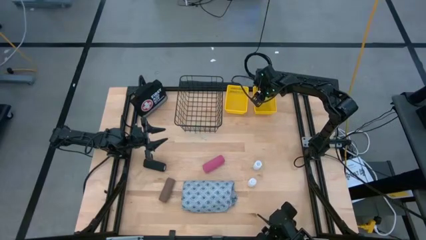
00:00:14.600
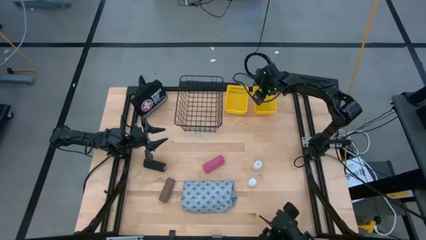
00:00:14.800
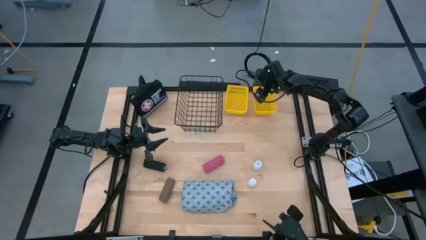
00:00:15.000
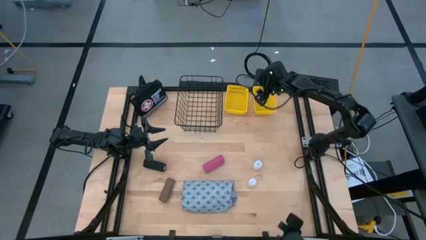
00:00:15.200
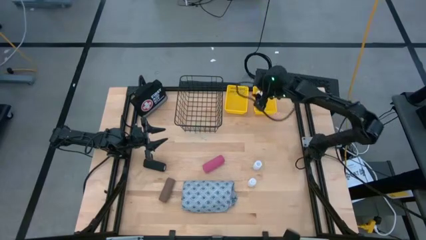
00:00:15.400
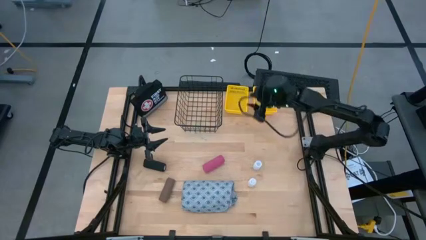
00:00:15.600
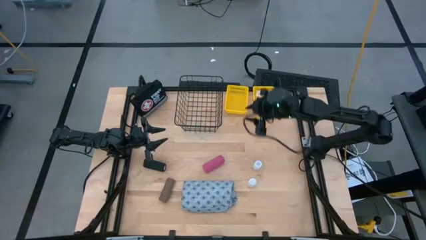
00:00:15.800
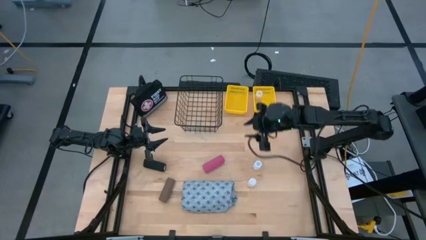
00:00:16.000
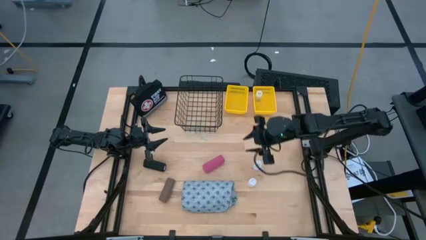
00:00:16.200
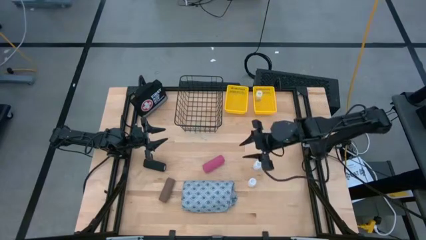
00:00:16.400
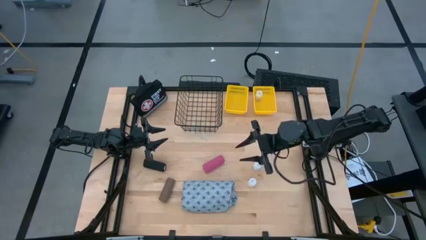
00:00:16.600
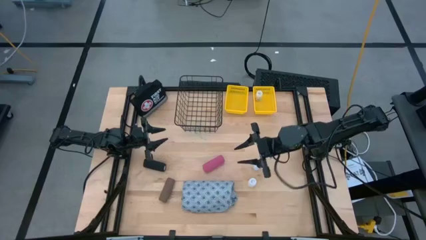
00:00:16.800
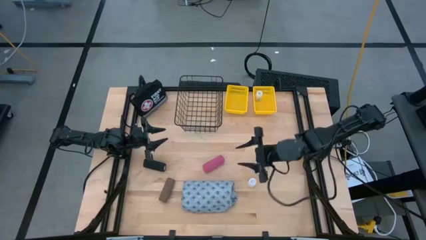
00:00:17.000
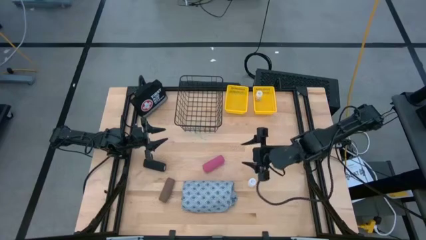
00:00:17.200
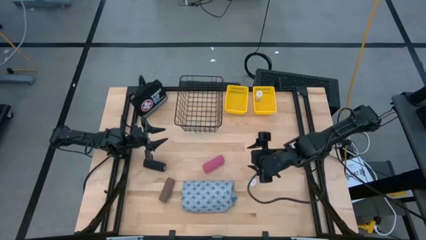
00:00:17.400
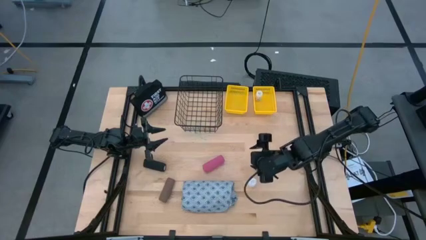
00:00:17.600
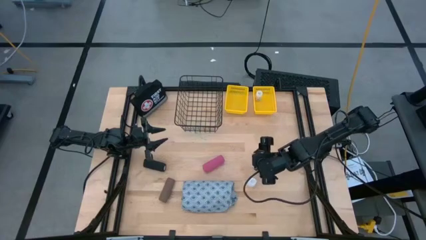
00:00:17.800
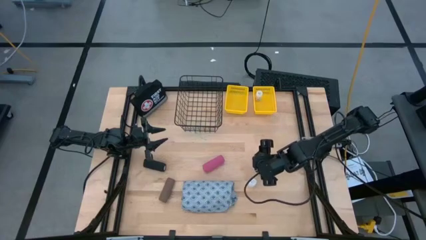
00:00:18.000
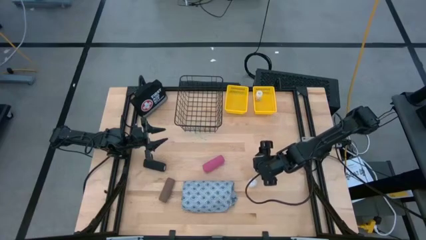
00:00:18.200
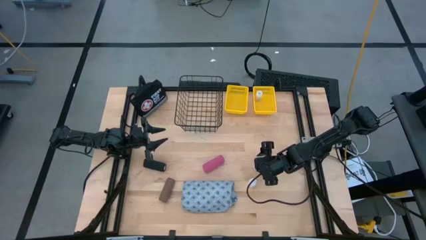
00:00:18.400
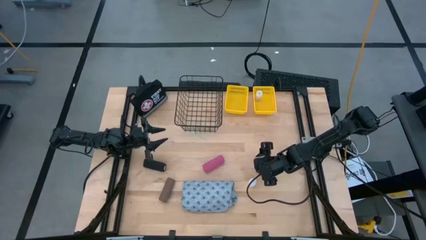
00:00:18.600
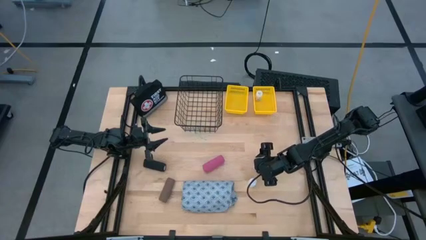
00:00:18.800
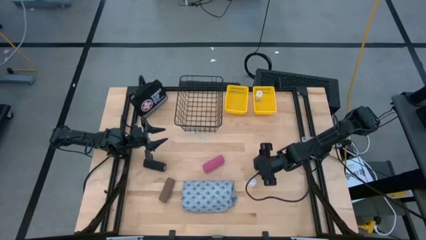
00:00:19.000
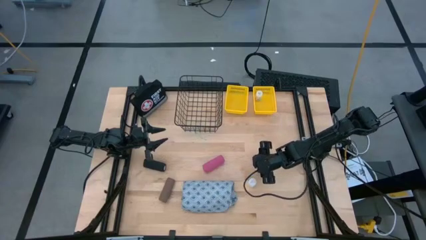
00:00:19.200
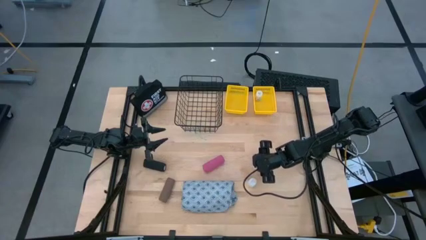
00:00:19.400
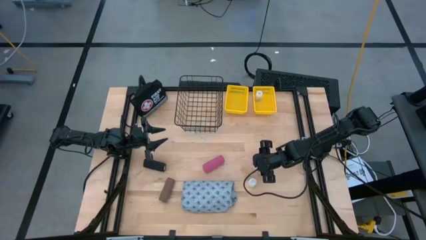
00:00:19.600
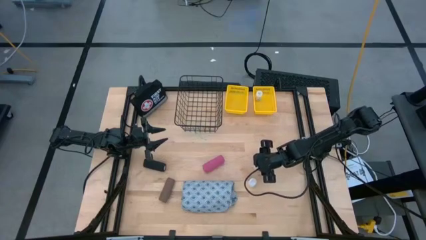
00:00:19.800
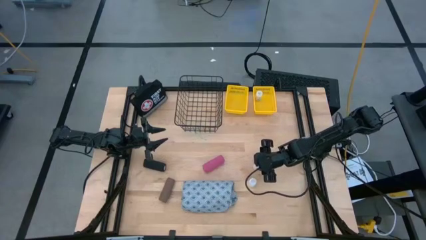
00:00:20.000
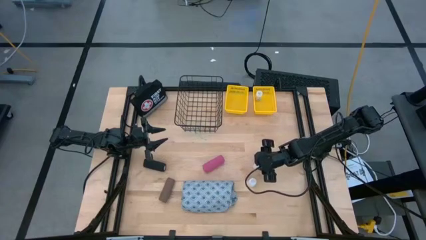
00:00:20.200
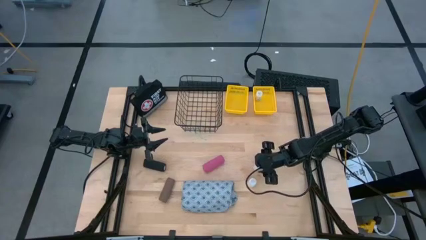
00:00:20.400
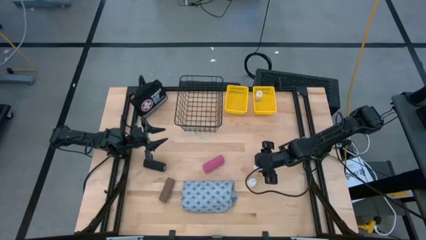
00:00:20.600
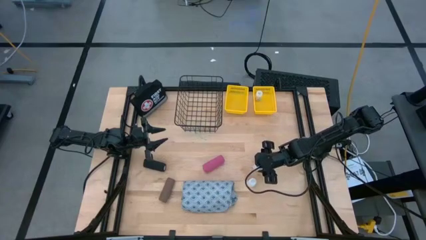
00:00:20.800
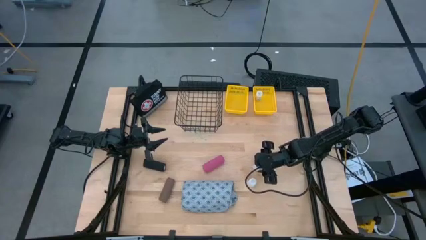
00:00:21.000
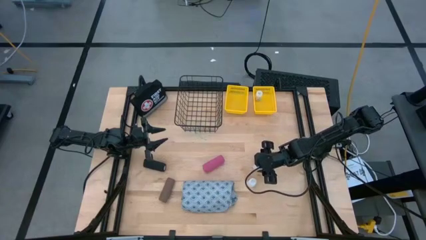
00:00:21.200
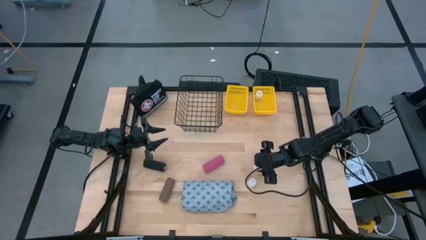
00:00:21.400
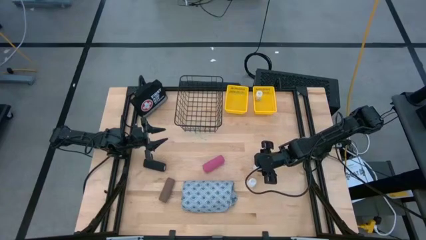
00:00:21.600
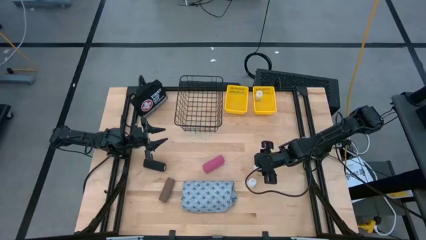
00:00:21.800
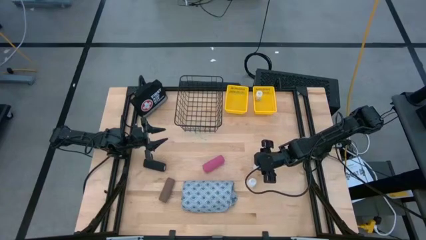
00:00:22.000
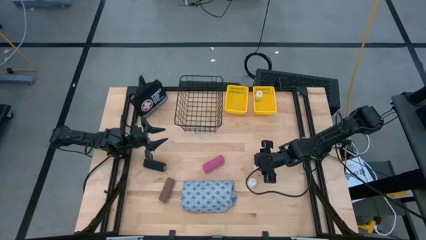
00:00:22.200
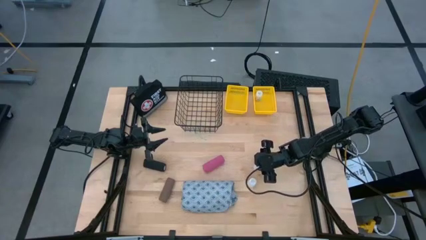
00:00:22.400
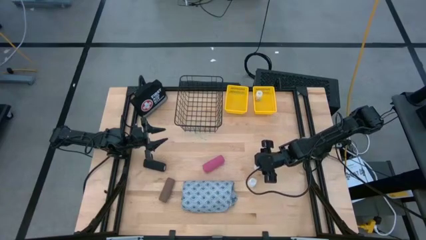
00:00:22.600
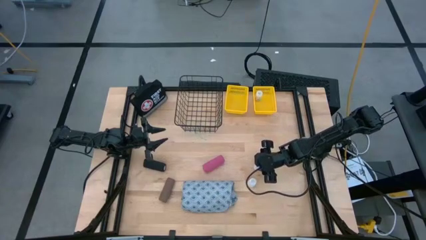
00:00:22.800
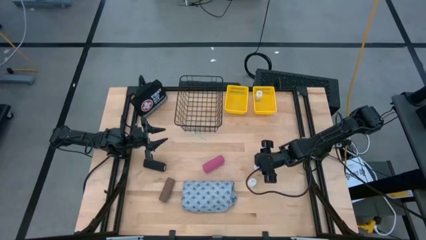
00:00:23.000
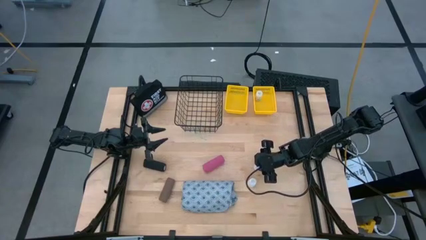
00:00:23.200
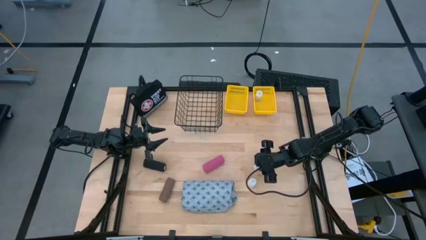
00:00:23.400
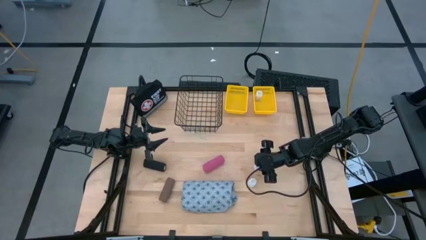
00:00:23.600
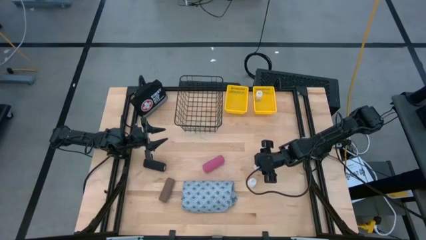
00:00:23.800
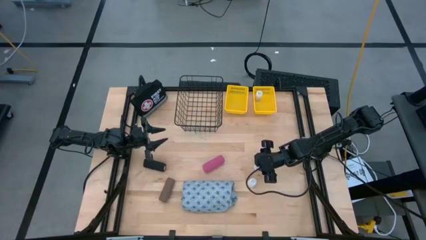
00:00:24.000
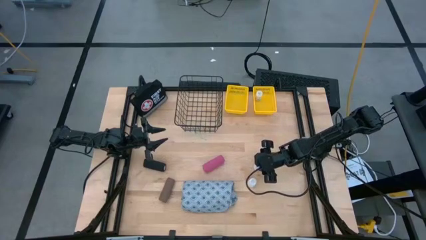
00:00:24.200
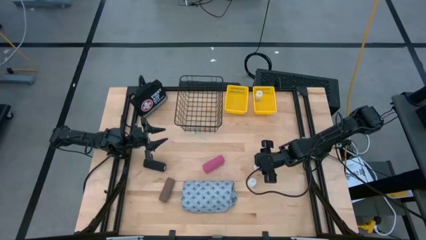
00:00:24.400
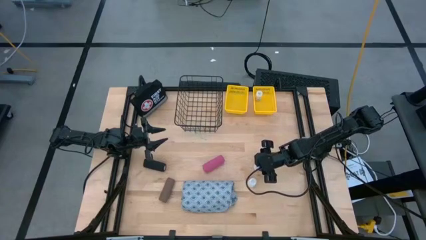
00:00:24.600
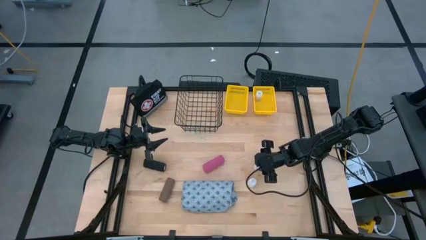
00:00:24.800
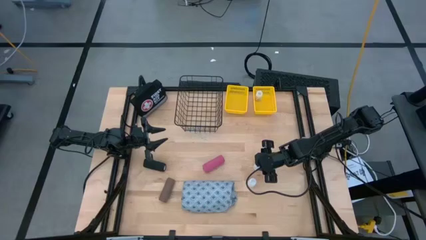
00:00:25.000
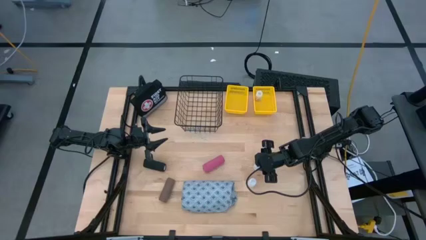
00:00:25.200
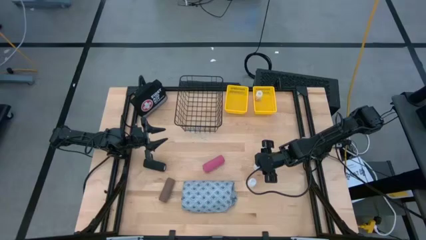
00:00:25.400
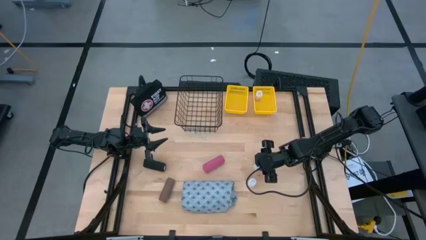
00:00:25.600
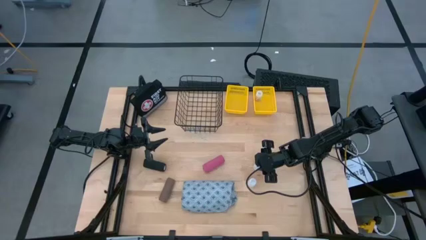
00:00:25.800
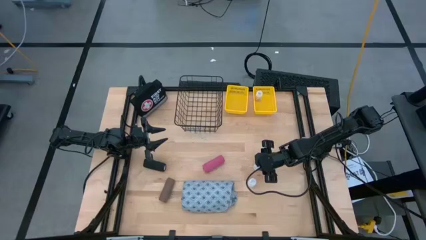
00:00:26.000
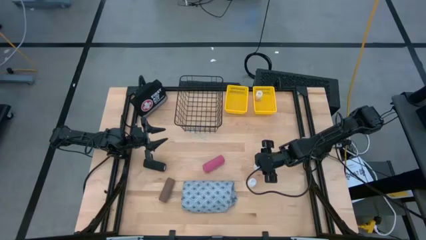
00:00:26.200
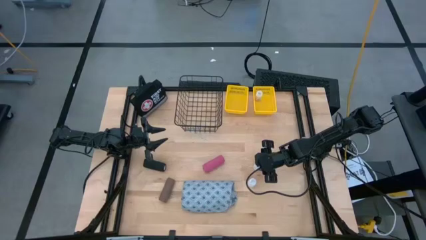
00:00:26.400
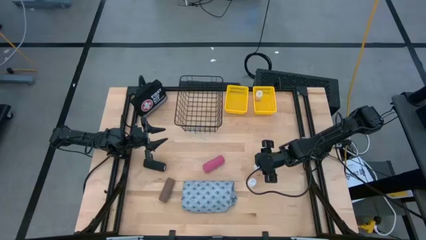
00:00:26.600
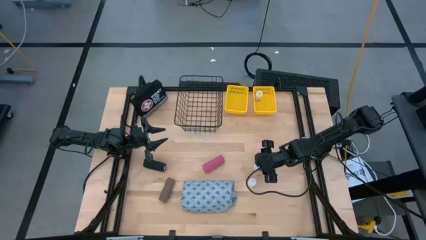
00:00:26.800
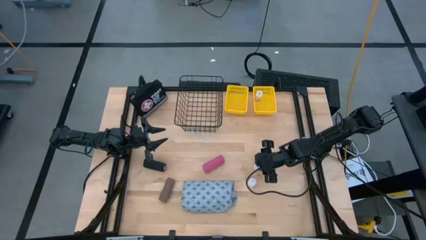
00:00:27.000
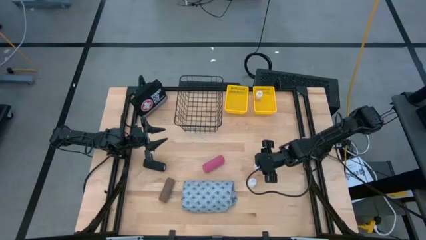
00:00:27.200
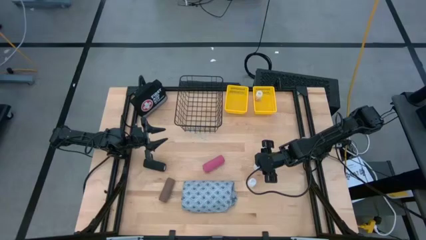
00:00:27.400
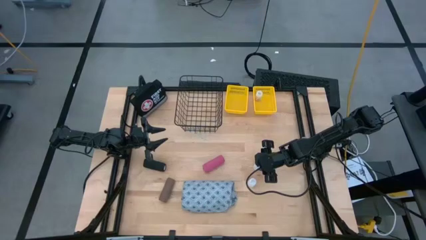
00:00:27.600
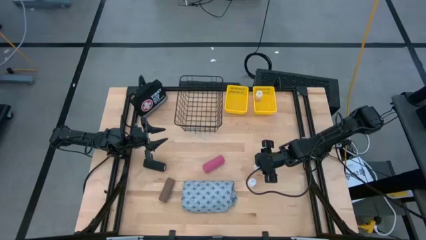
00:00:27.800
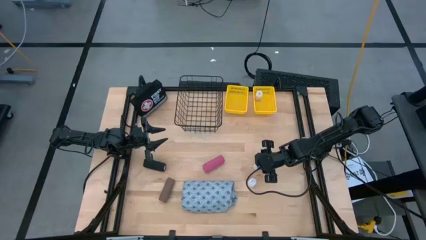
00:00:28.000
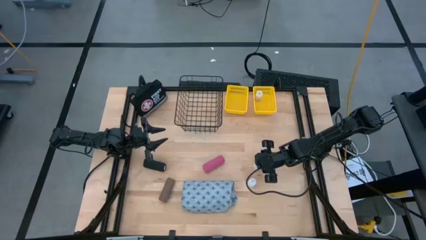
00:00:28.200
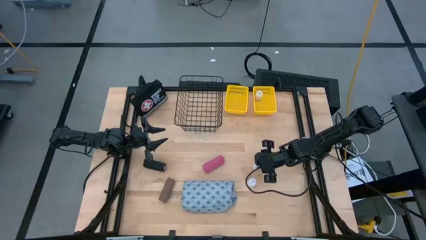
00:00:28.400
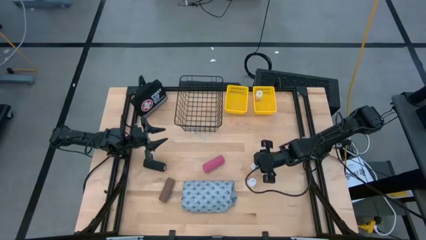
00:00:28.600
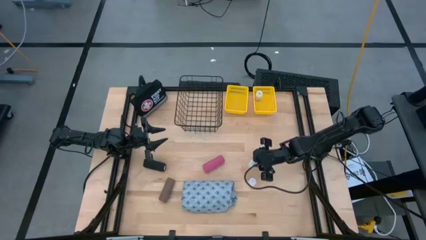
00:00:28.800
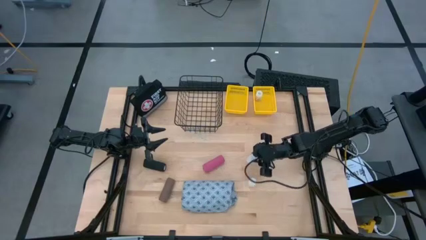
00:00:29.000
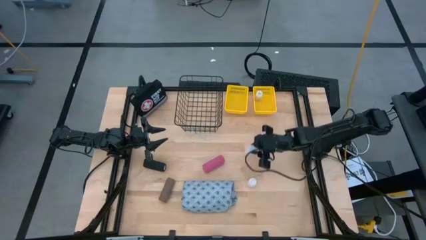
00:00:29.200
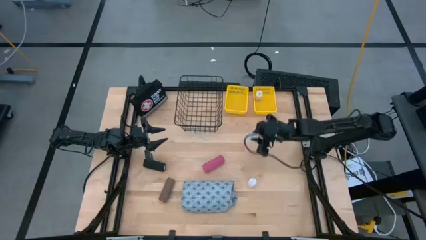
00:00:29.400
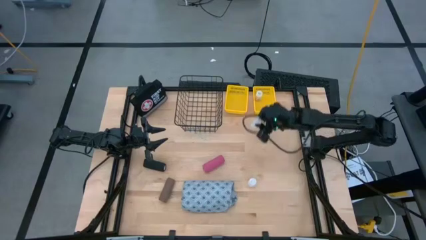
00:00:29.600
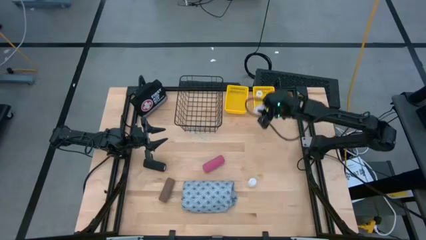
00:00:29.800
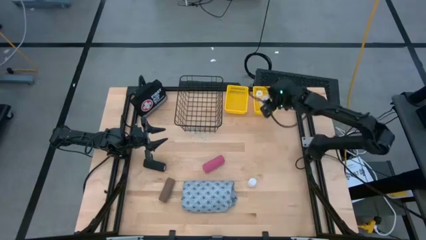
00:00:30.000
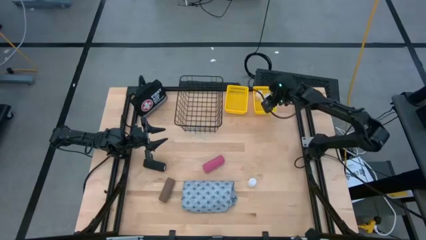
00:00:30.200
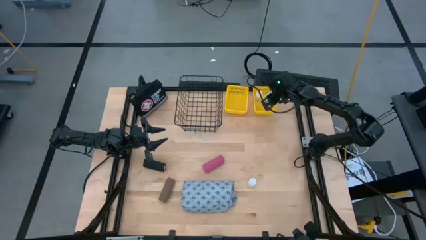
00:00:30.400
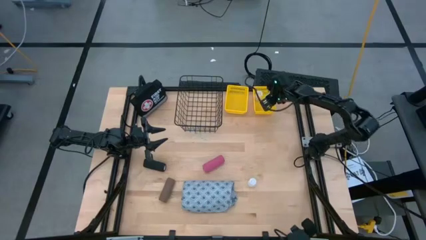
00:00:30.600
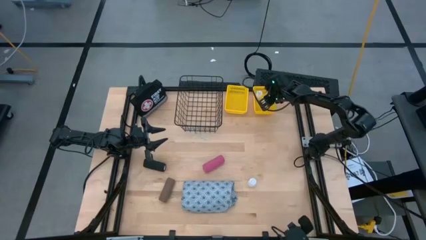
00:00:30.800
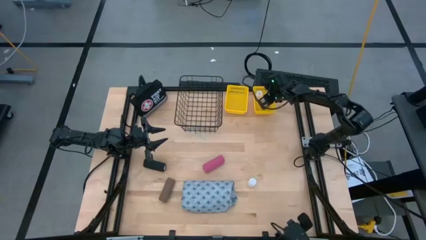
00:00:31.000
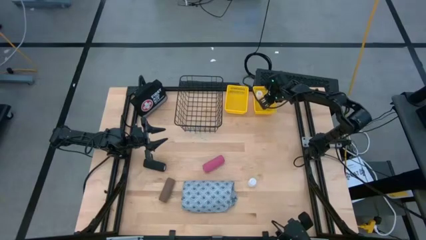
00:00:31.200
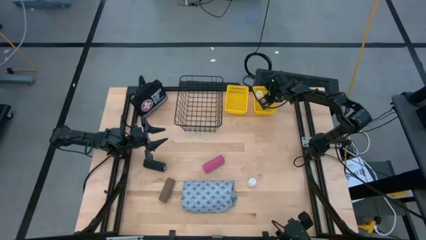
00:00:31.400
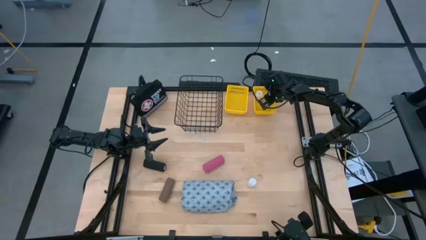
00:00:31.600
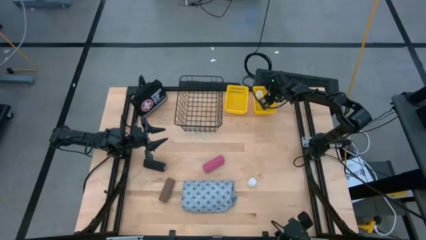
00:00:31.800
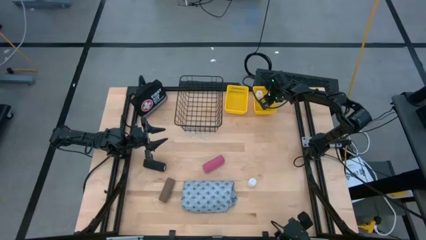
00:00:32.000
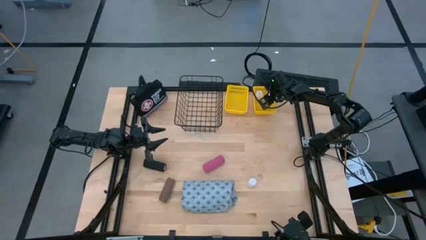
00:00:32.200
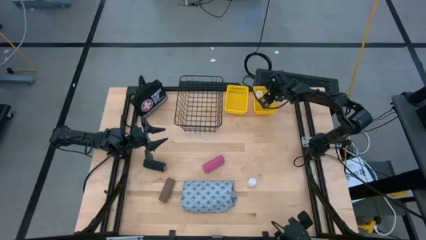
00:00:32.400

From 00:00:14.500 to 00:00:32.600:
Task: Pick & Place Medicine items
Put the top white medicine bottle into the right yellow basket
